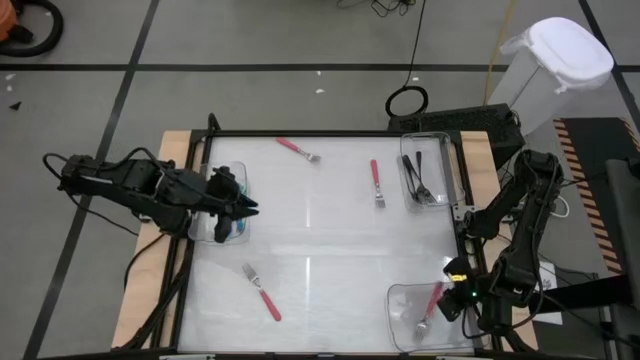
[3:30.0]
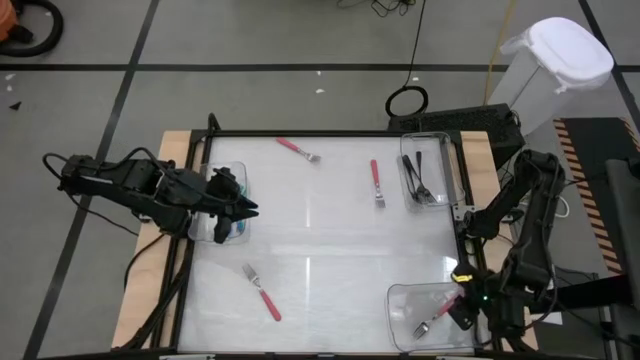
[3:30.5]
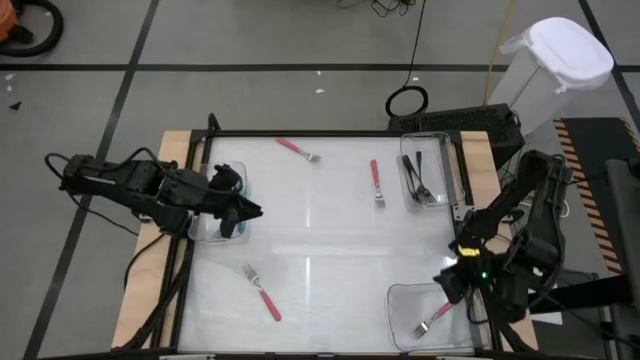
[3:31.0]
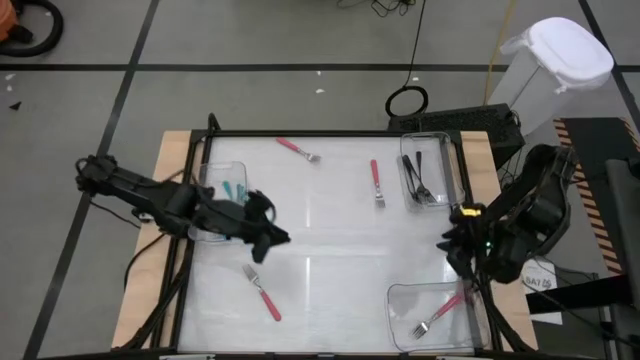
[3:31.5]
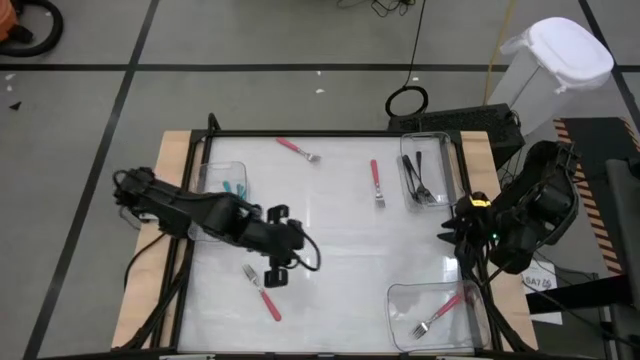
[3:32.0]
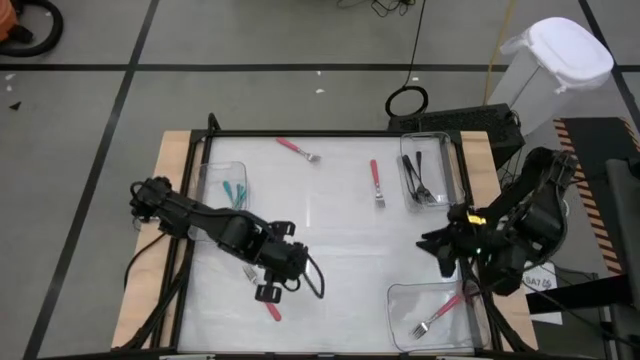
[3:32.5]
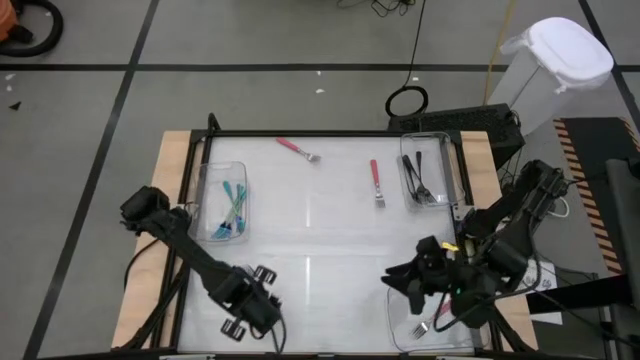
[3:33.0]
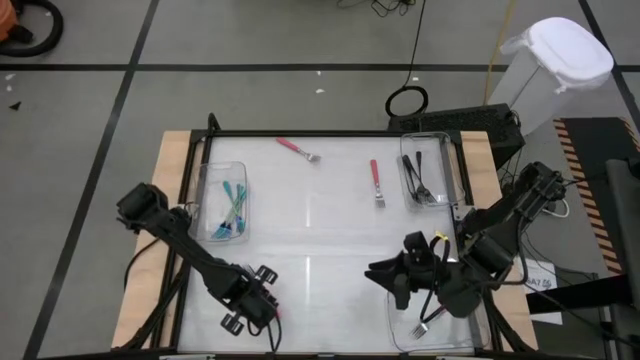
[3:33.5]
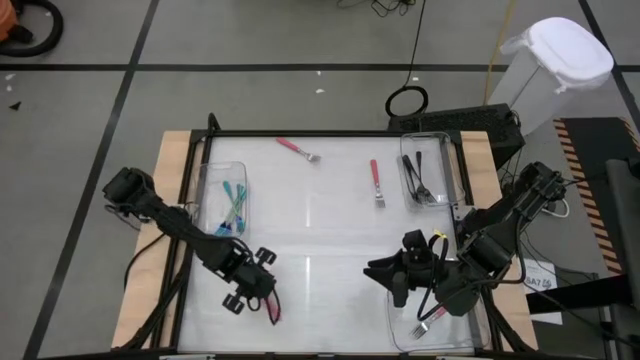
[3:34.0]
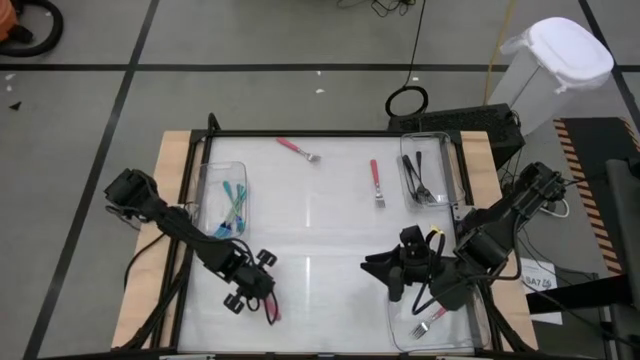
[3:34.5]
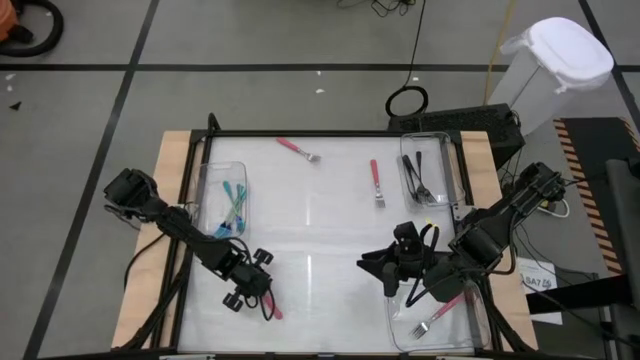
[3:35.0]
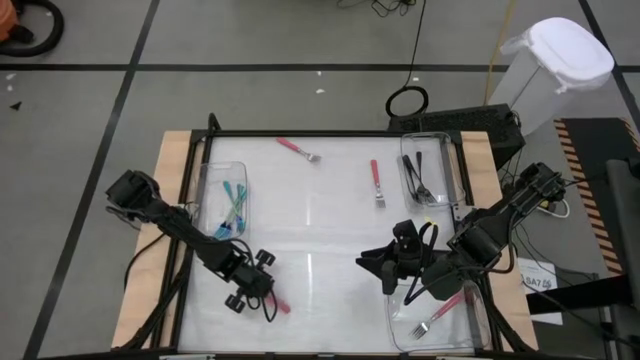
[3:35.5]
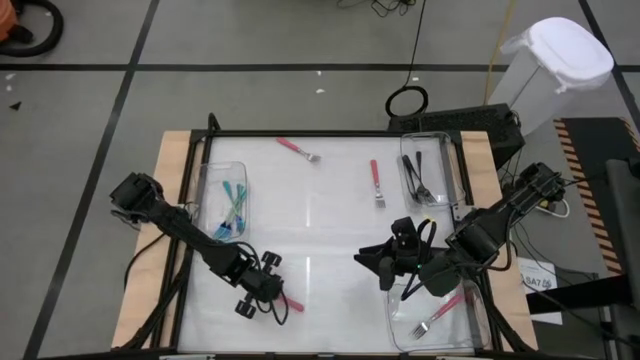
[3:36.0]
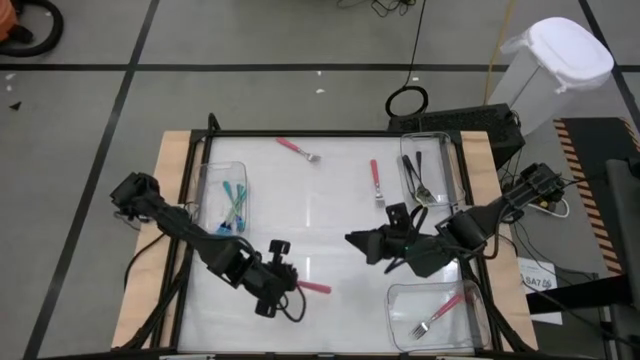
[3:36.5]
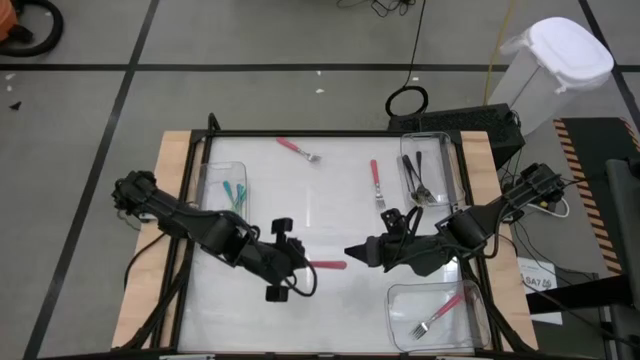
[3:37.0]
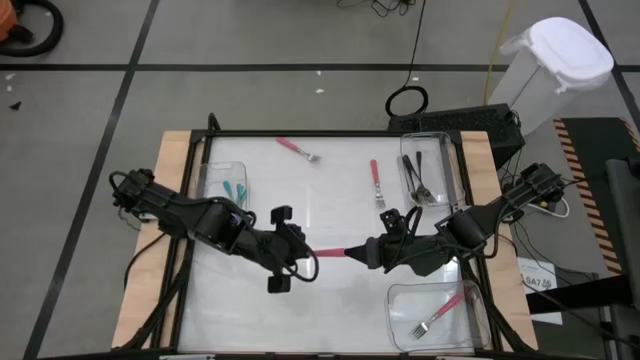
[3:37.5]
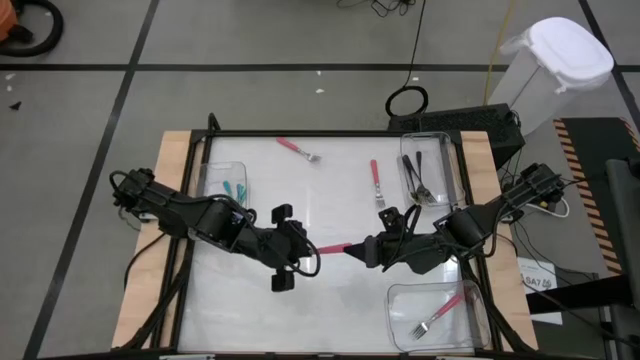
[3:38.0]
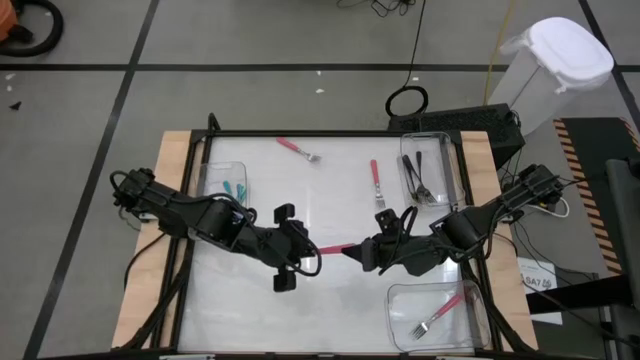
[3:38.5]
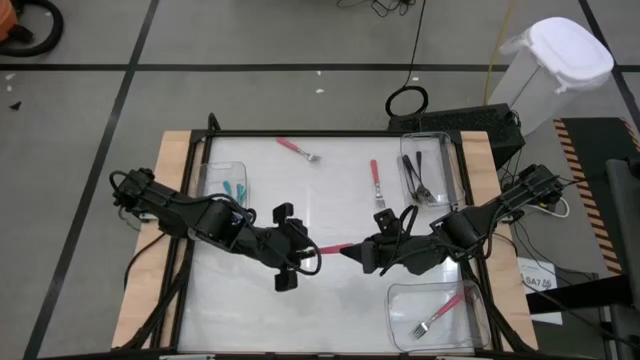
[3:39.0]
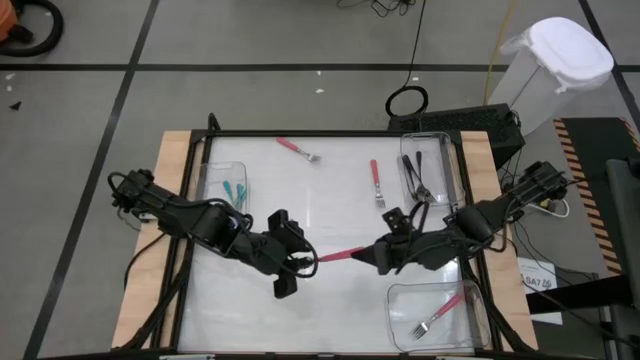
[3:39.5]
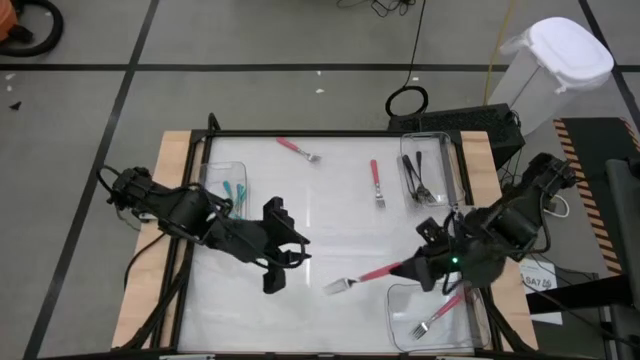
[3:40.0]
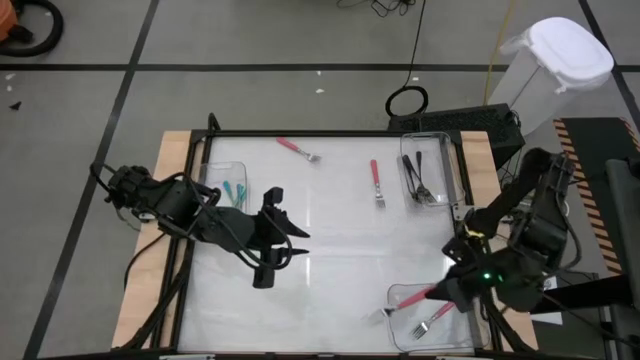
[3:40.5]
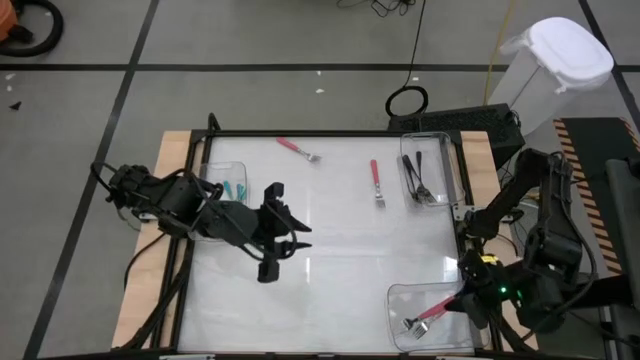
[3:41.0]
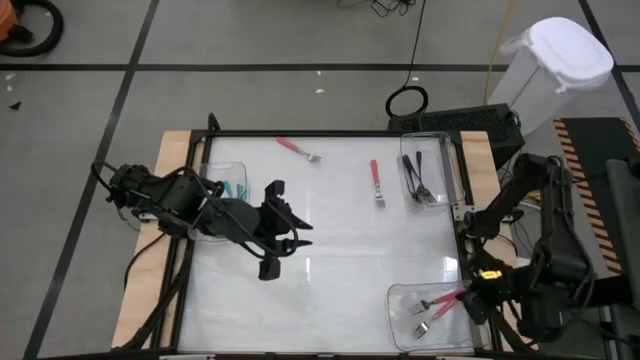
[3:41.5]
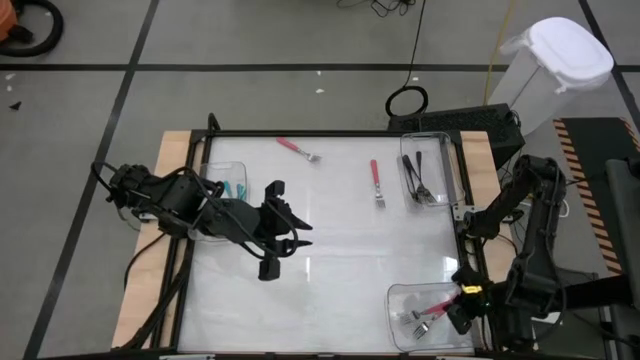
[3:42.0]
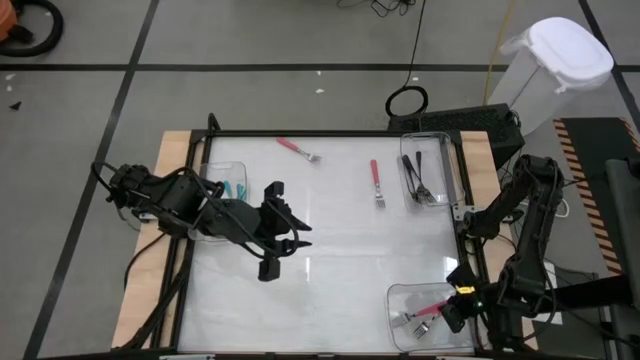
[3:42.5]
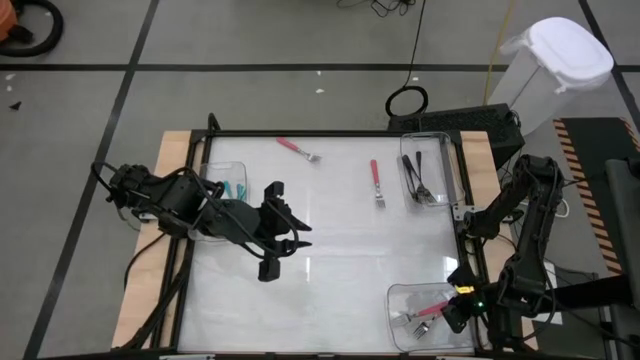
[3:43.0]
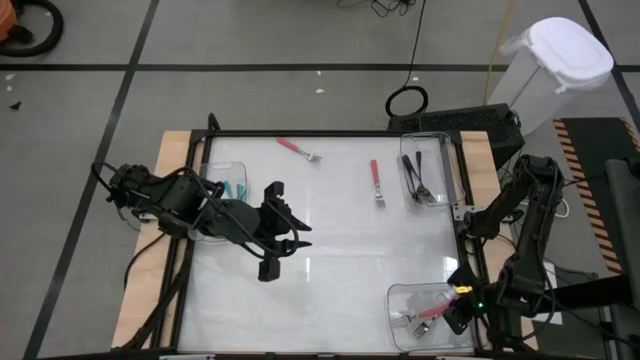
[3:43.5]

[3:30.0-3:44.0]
Task: Sort silverware by color (type)
Put the pink fork into the bottom right transparent bin

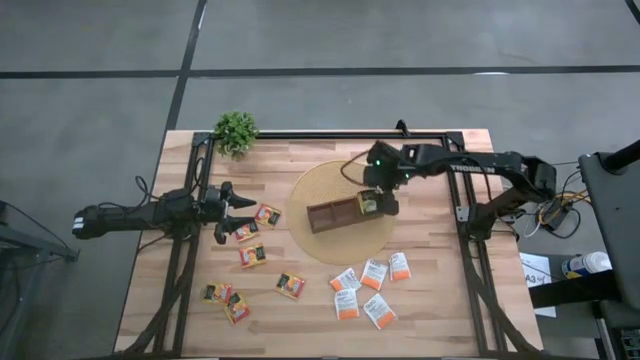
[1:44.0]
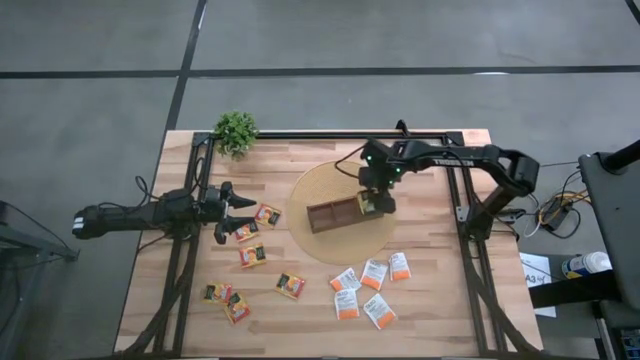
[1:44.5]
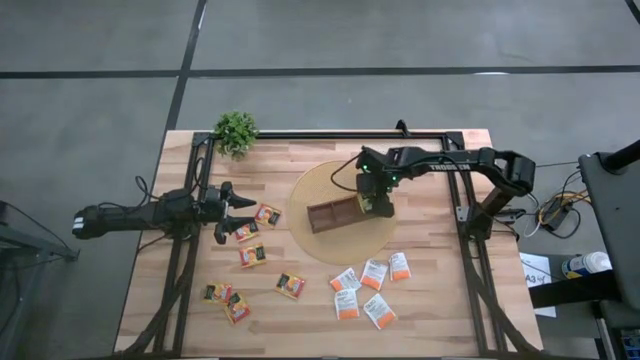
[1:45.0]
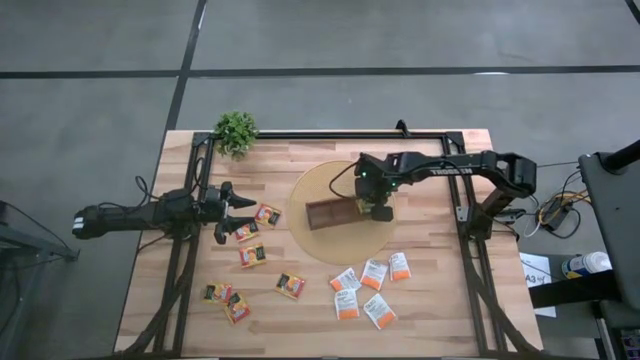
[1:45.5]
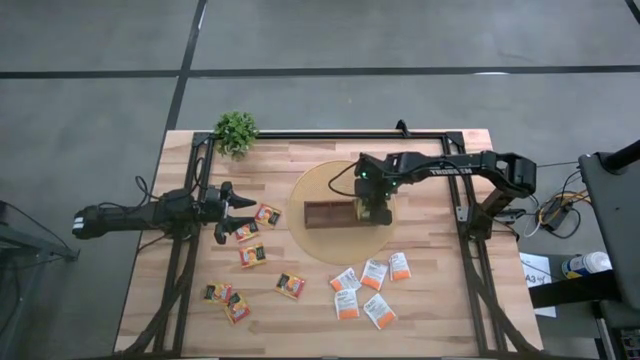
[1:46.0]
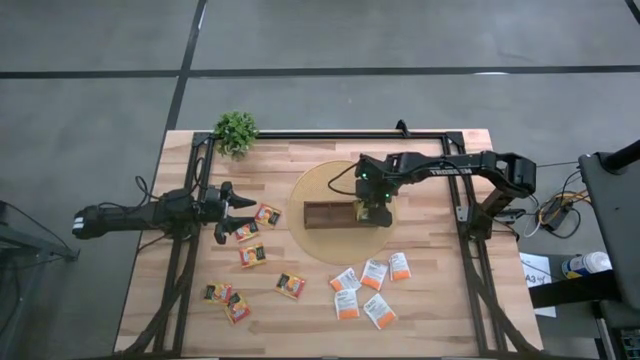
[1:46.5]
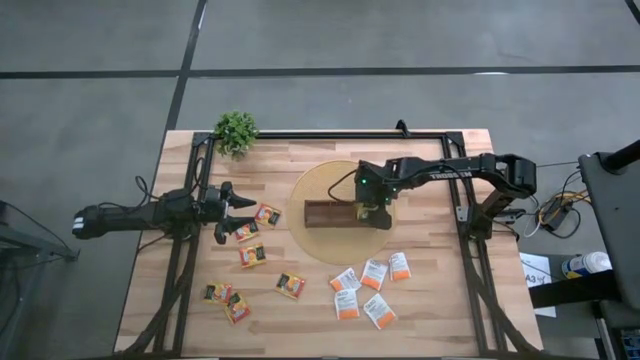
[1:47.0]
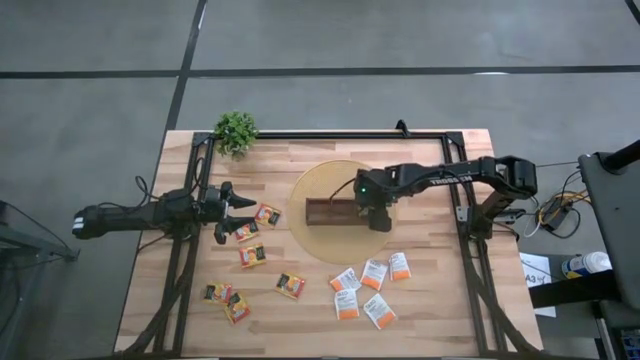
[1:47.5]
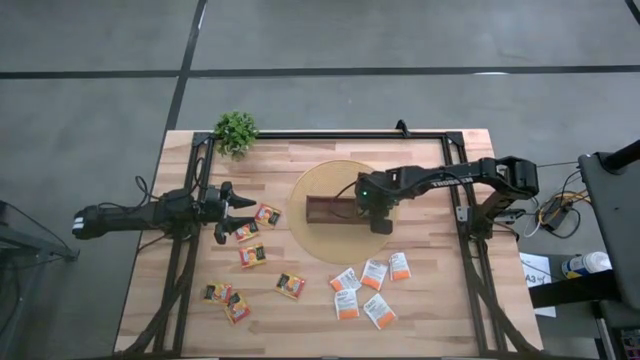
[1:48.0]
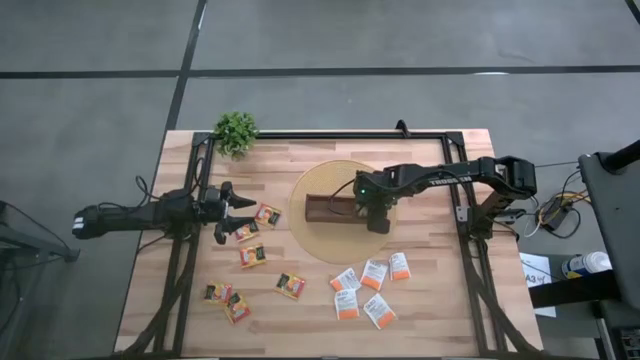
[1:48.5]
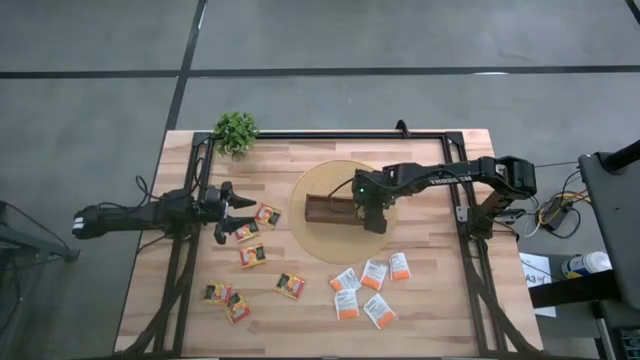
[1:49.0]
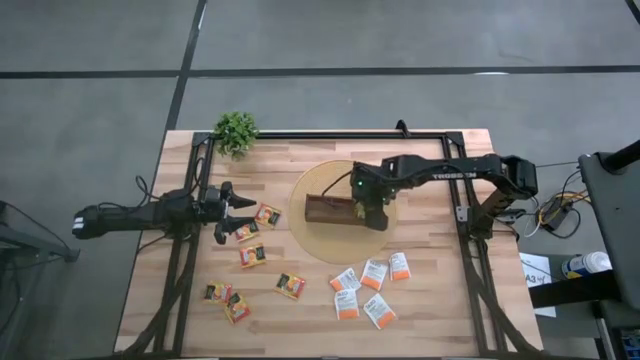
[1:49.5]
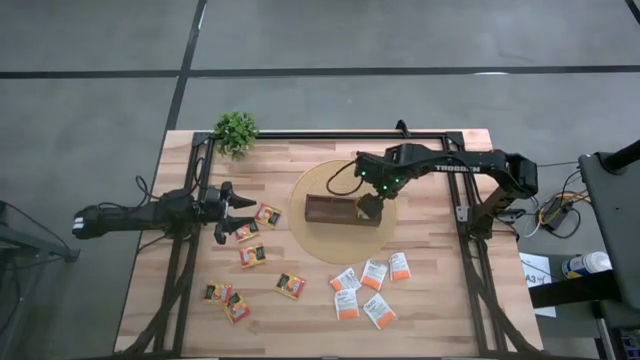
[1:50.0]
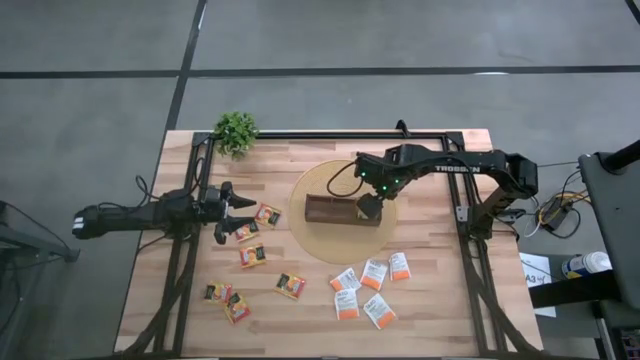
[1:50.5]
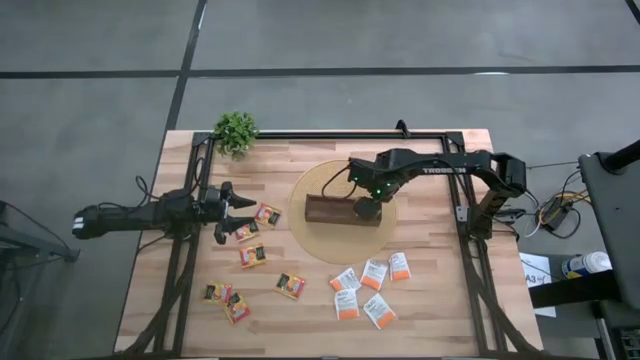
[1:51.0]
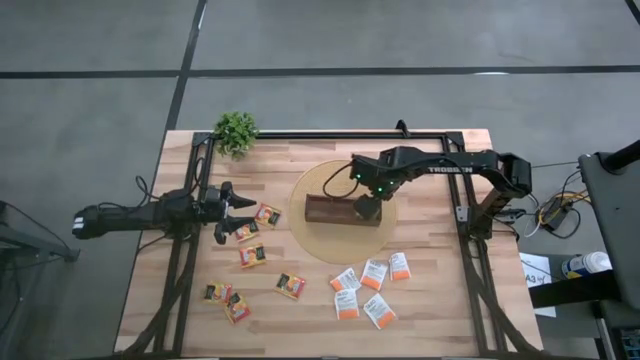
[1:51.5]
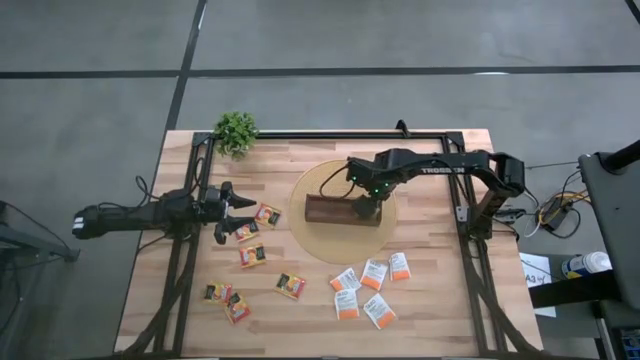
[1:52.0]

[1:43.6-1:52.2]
Task: Pick & Place Tea
Adjust the yellow tea bags in the right section of the wooden organizer

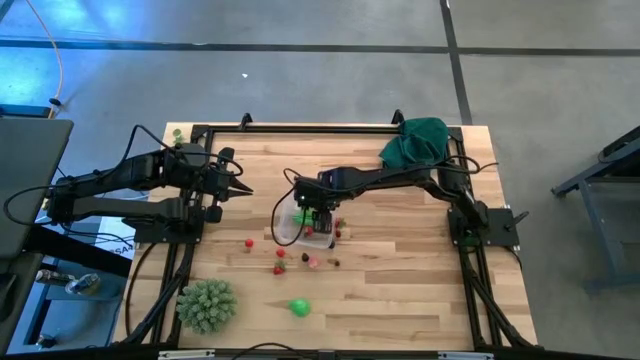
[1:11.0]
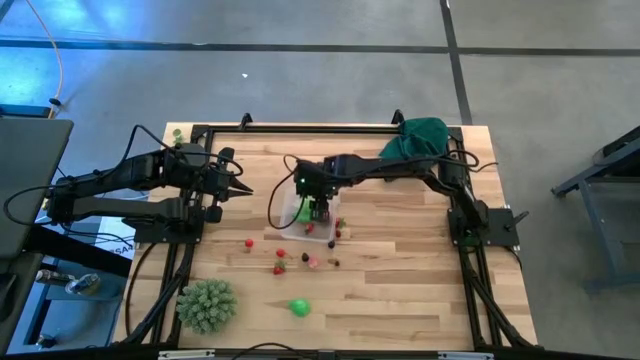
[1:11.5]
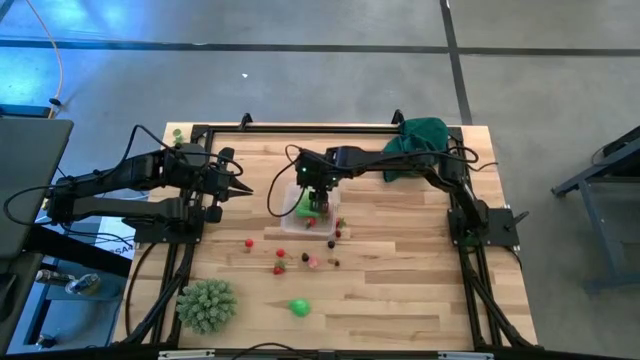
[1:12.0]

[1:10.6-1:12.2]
Task: Pick and placing Produce into tupperware
Adjust the transparent container on the table
